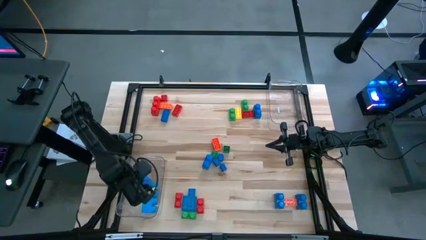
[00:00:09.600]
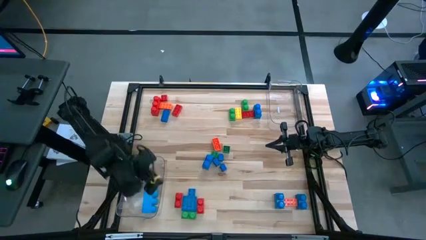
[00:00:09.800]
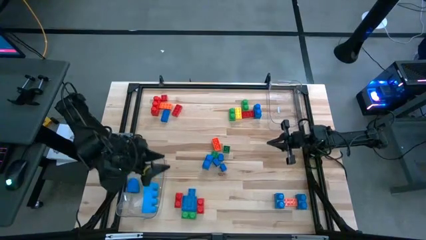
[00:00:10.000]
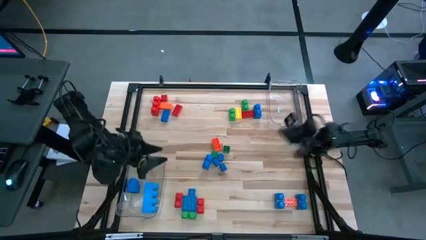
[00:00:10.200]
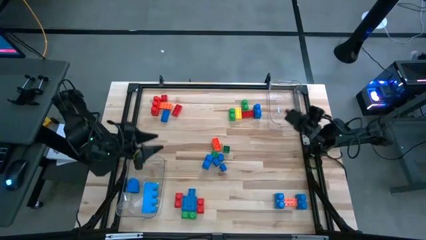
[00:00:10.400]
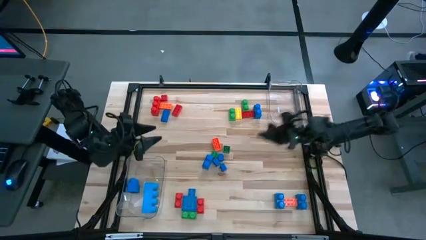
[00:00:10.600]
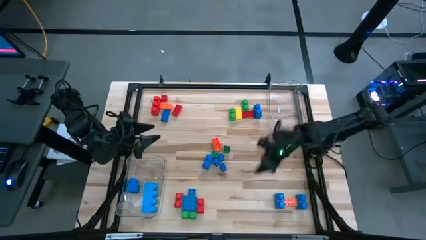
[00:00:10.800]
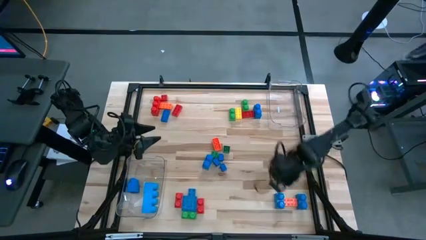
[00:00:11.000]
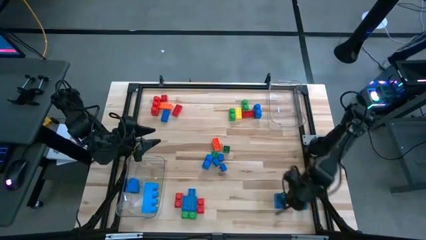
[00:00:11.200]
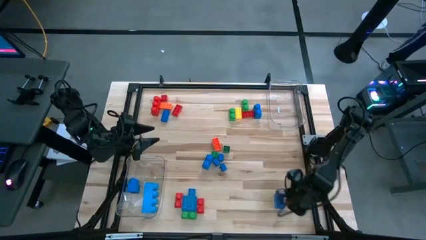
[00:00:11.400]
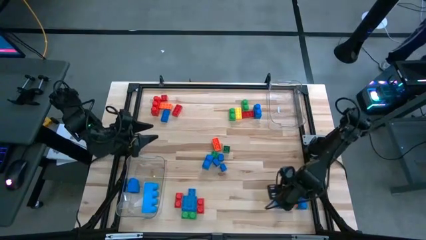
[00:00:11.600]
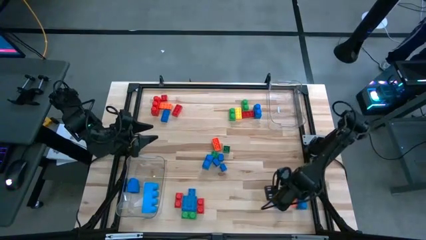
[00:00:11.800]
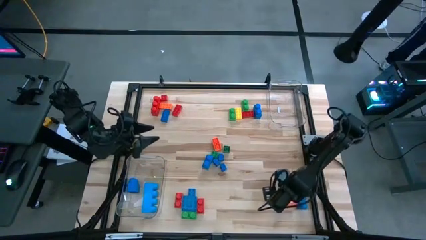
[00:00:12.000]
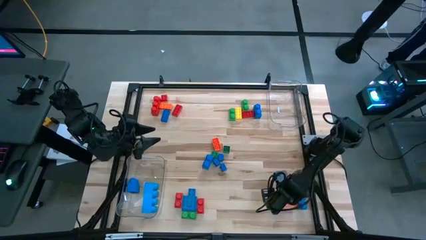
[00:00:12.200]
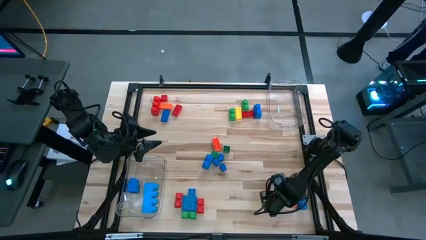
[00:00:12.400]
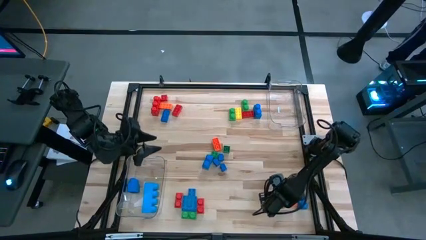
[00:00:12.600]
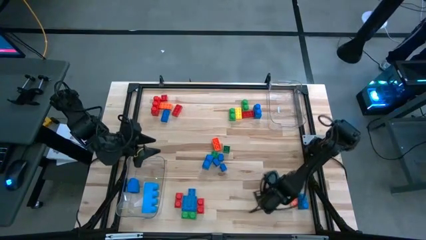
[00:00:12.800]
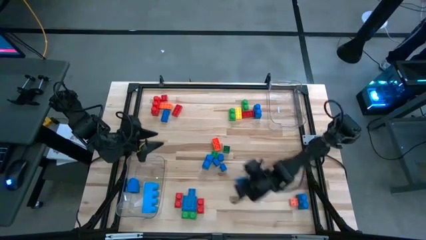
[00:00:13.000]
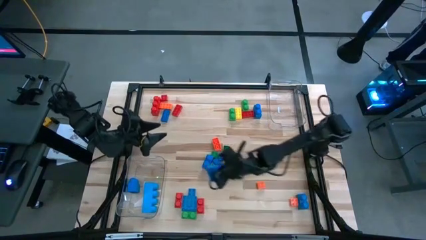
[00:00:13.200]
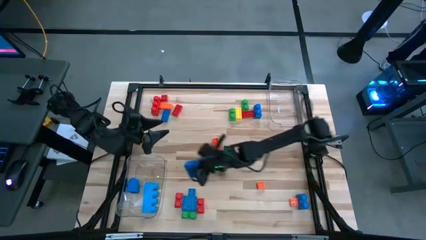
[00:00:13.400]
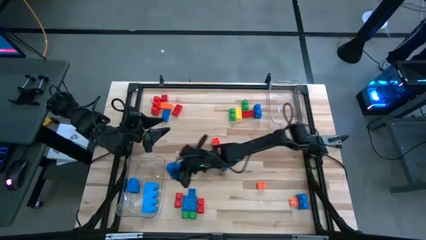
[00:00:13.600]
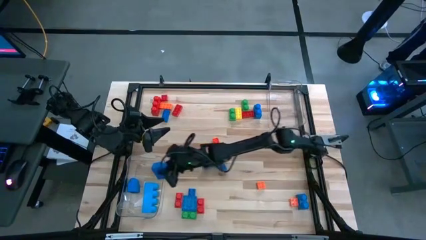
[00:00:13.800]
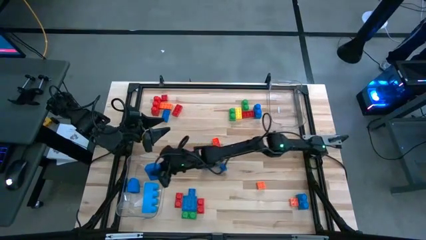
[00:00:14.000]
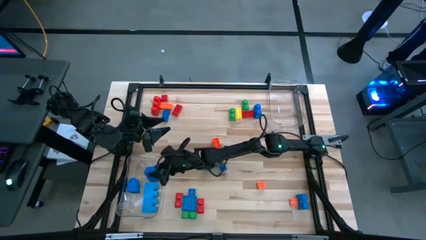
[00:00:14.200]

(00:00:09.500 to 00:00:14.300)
Task: Sort blocks by size
Put the large blue game piece into the bottom transparent bin

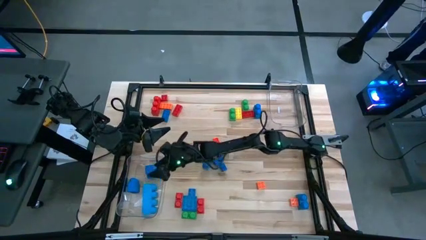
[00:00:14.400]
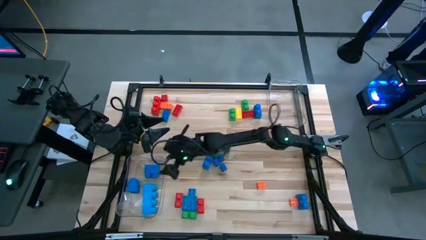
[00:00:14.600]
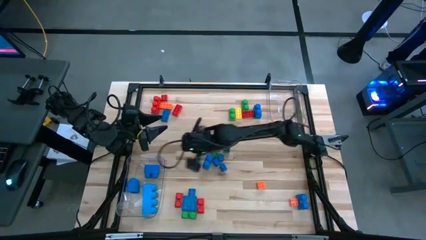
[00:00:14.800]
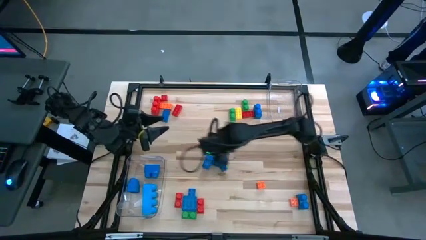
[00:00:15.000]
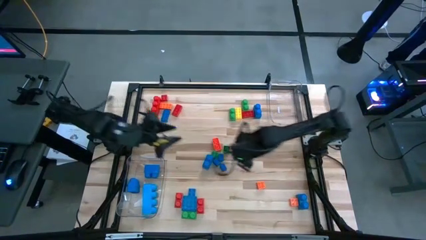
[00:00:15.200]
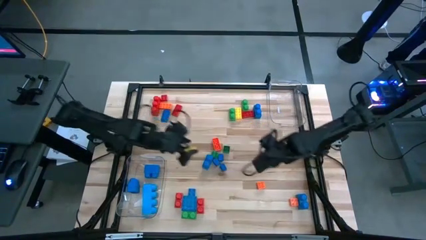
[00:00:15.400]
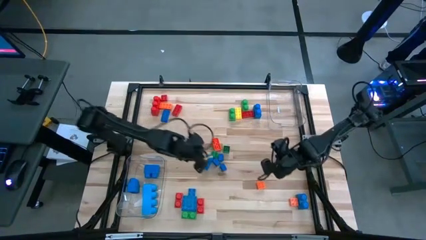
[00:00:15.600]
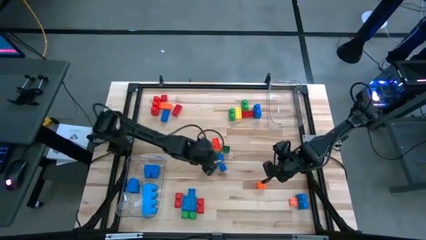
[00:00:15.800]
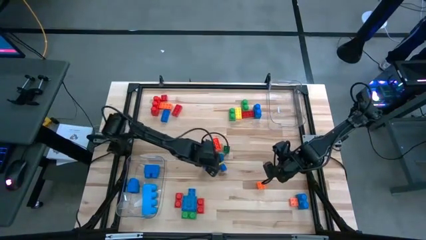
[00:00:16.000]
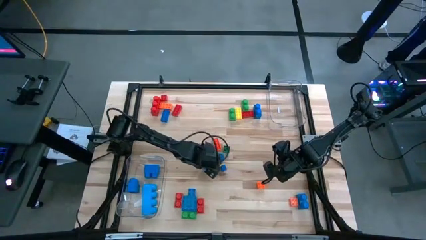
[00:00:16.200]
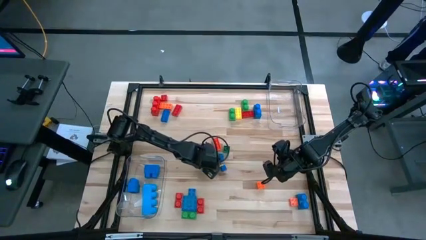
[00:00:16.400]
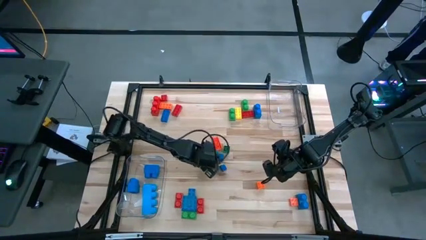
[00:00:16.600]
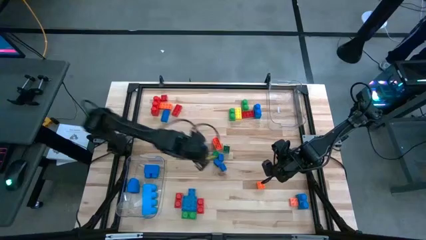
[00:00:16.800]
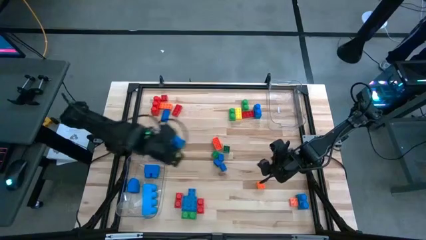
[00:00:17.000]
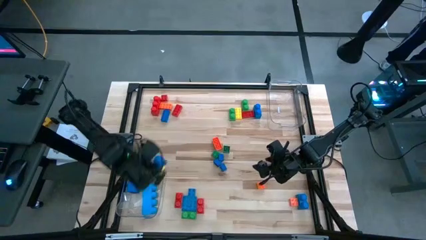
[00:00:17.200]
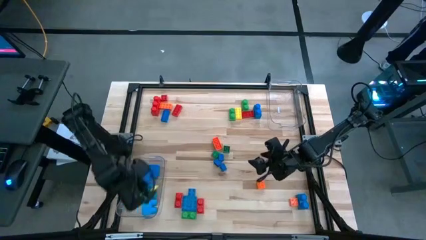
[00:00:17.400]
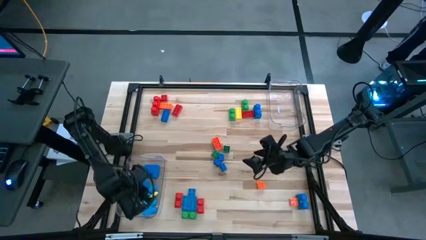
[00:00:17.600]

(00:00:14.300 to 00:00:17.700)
Put the large blue game piece into the bottom transparent bin

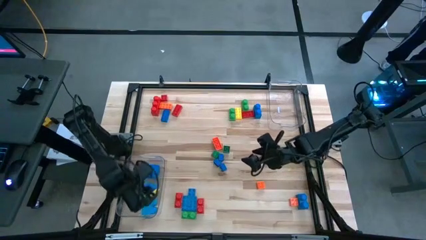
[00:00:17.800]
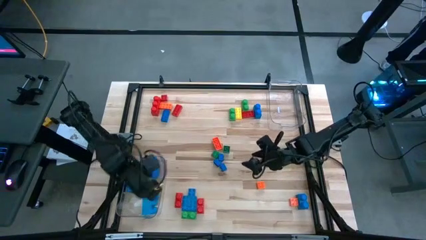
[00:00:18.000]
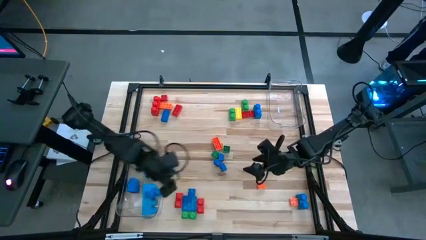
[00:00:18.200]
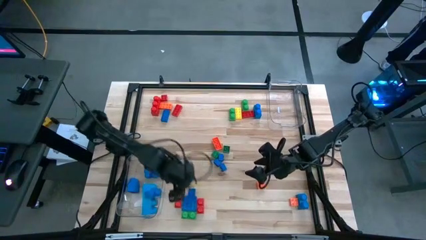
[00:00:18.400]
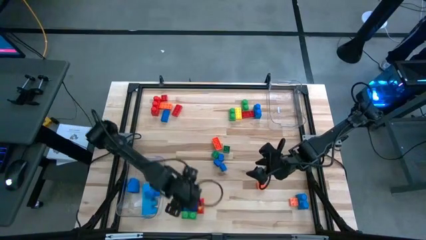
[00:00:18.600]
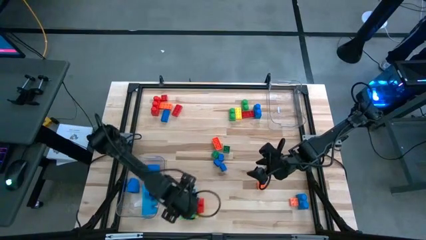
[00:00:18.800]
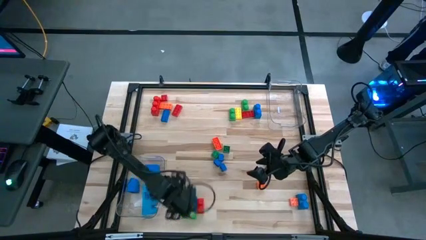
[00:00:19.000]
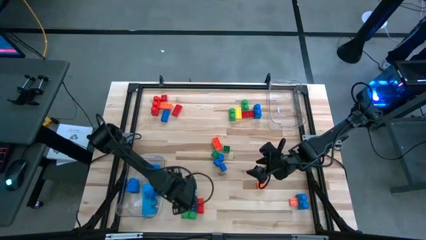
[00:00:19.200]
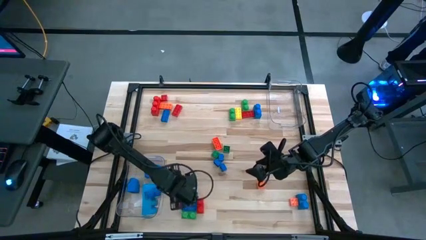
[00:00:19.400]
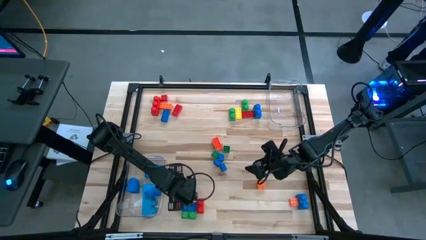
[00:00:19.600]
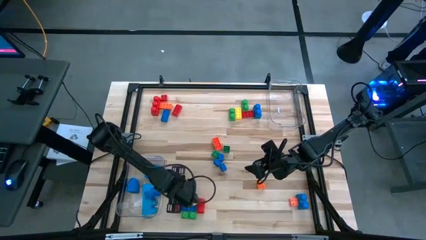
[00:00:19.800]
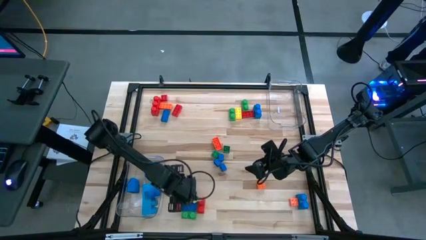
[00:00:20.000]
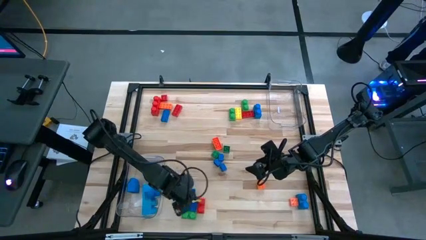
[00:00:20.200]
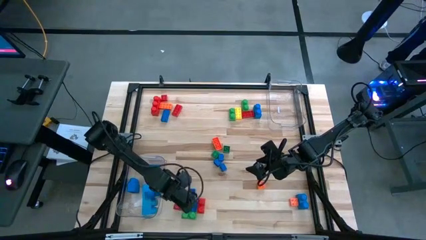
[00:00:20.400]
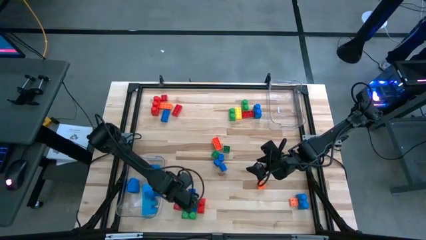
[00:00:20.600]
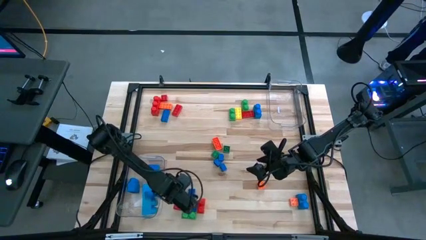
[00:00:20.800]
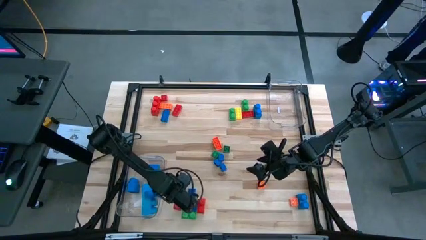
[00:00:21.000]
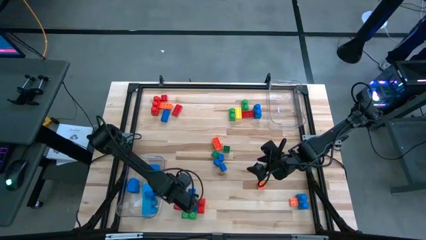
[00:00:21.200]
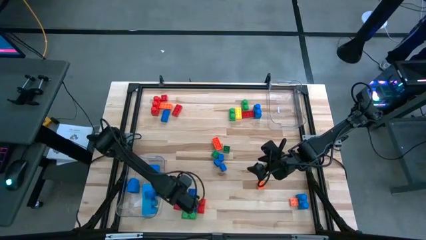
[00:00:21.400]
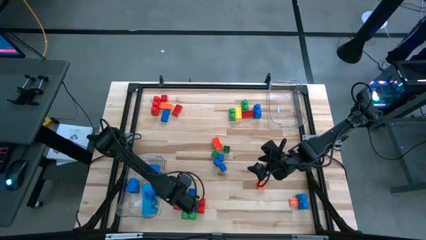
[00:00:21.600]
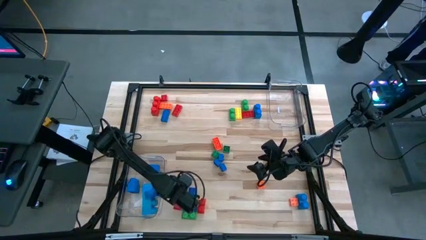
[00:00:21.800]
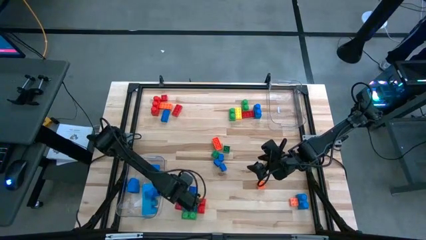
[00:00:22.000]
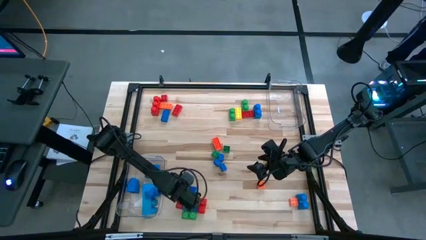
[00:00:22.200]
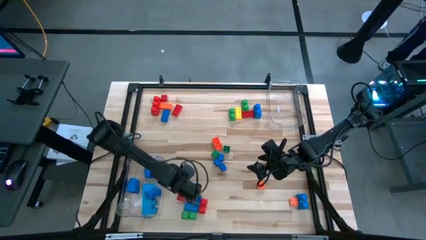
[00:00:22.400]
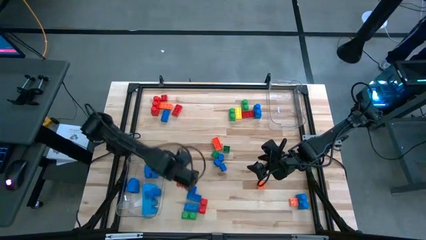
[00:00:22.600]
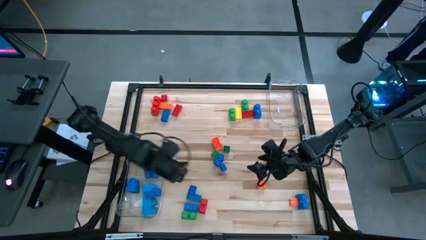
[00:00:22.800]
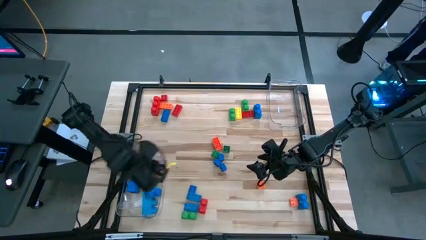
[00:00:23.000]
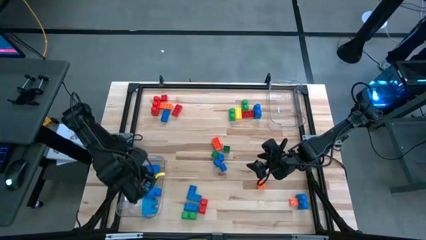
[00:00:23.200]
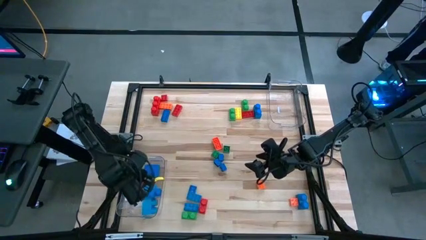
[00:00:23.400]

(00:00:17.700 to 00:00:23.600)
Put the large red game piece into the bottom transparent bin

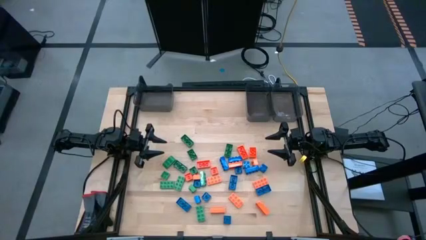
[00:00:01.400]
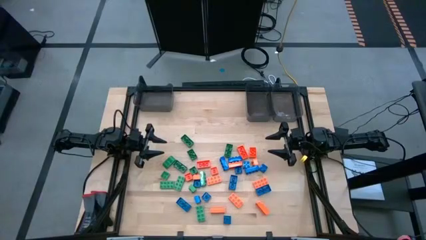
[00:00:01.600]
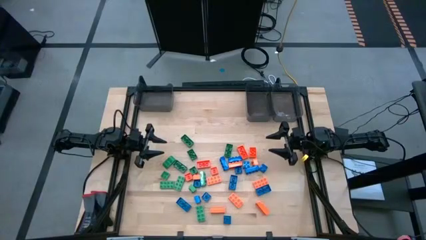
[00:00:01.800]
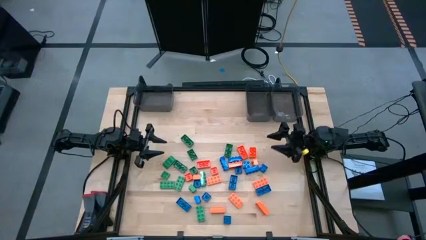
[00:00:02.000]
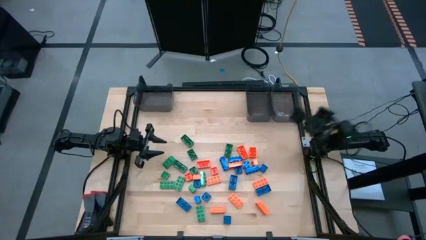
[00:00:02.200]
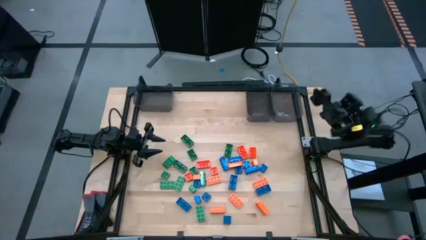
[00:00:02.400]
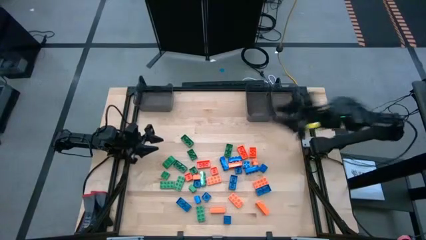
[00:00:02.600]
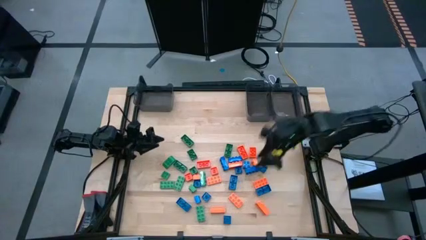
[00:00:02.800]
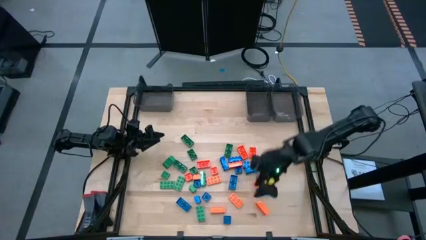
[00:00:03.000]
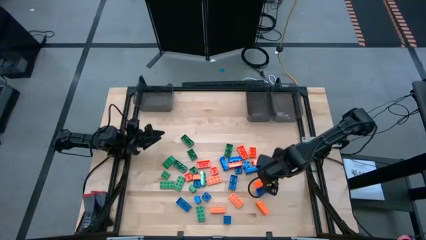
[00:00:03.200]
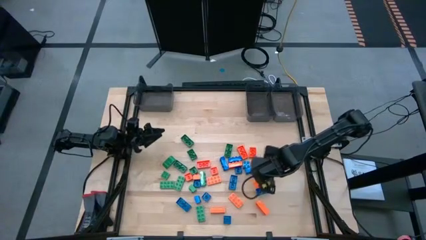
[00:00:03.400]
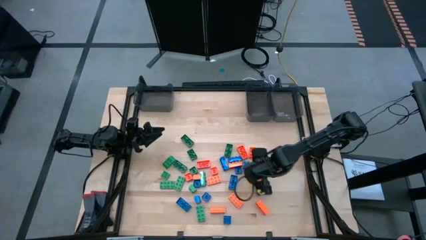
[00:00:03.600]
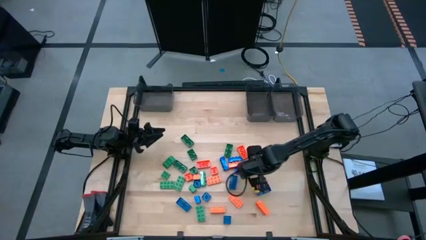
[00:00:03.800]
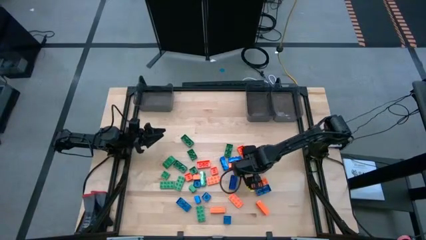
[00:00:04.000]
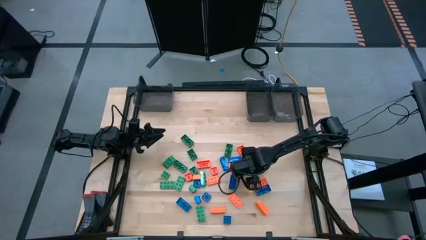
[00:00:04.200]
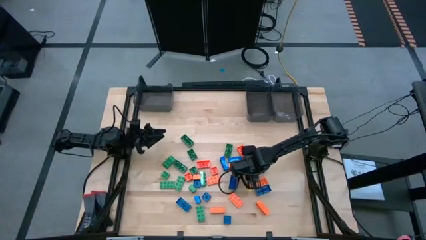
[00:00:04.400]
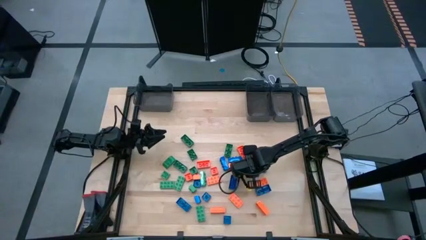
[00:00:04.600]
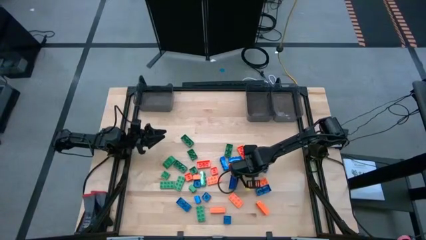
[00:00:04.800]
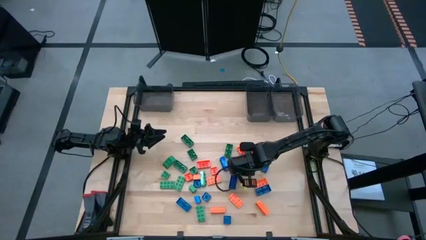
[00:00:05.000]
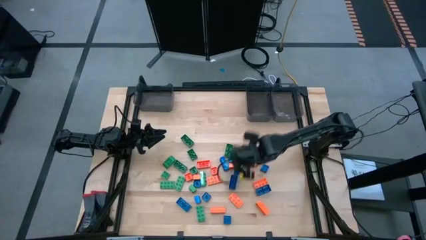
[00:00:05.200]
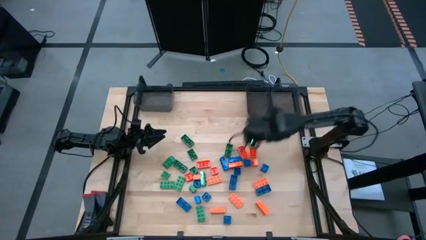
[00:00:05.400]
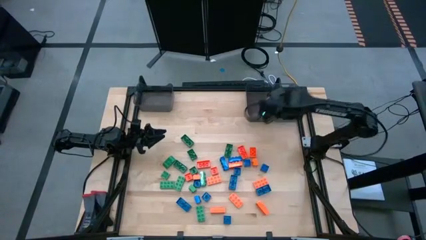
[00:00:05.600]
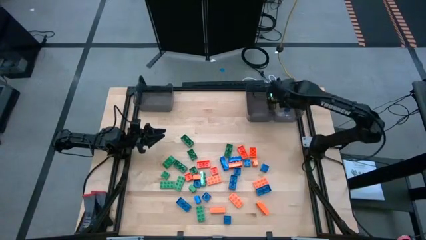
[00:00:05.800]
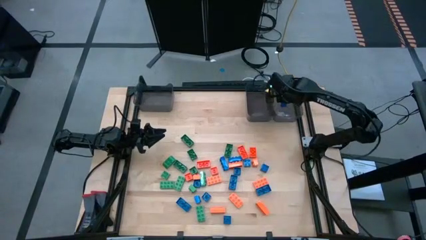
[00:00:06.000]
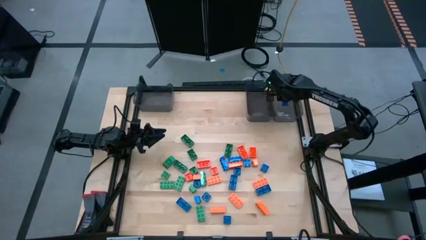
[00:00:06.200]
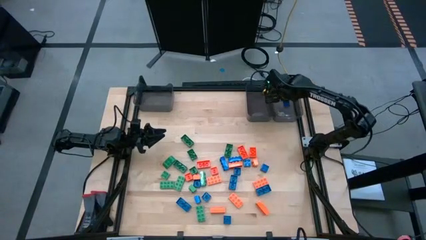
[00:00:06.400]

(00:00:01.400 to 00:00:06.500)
Task: Sort blocks
Put the blue game piece into the right black bin
